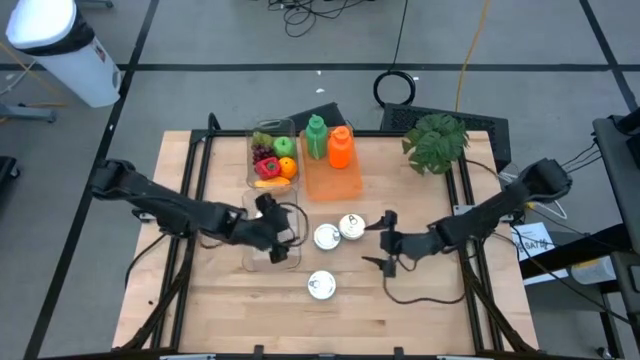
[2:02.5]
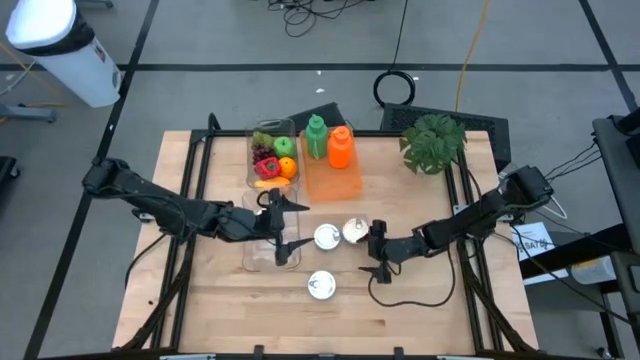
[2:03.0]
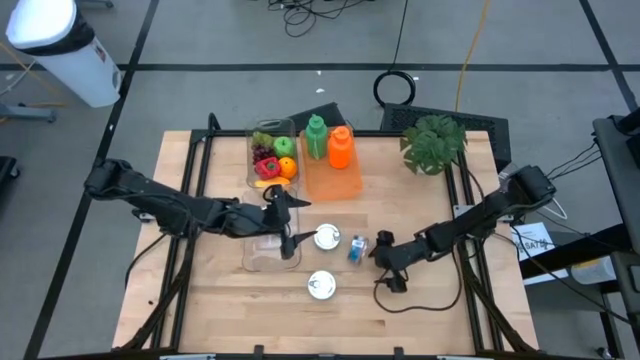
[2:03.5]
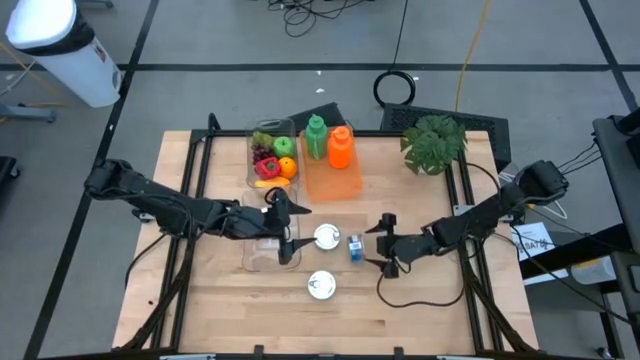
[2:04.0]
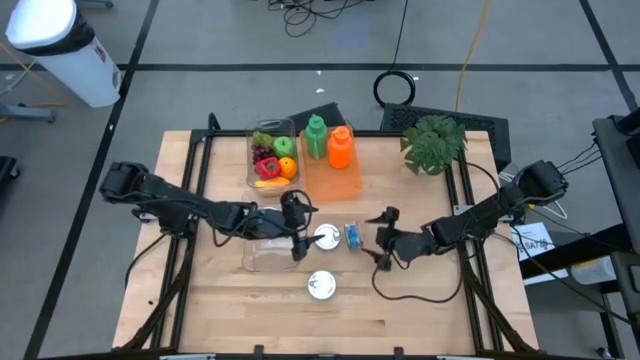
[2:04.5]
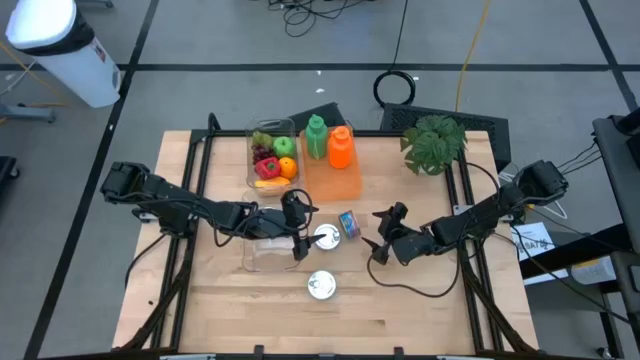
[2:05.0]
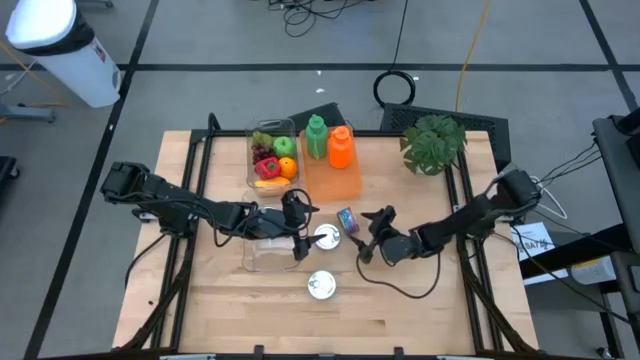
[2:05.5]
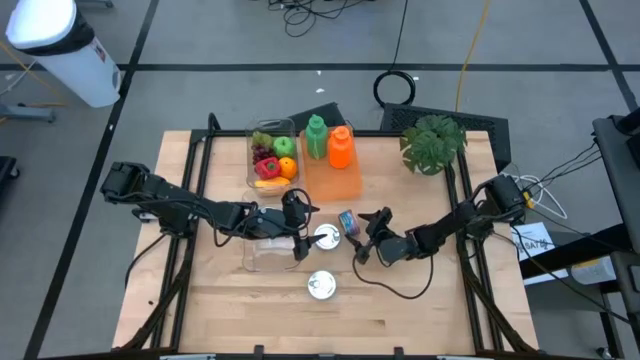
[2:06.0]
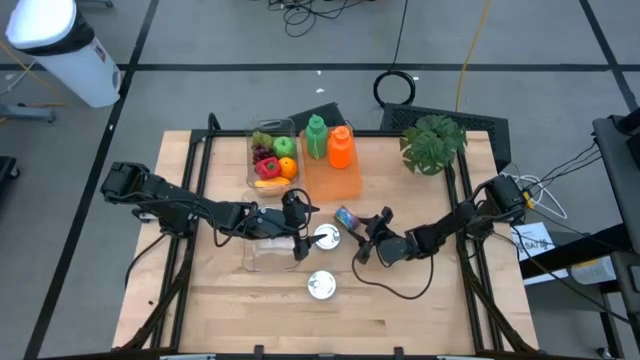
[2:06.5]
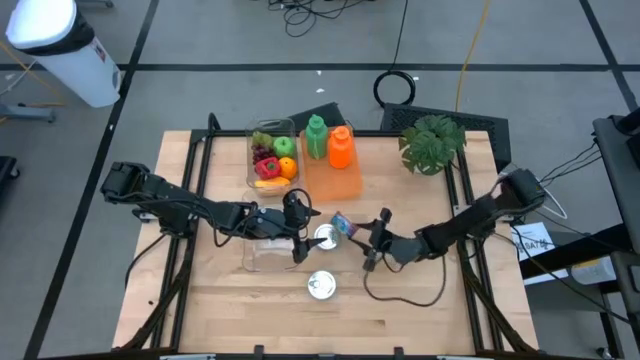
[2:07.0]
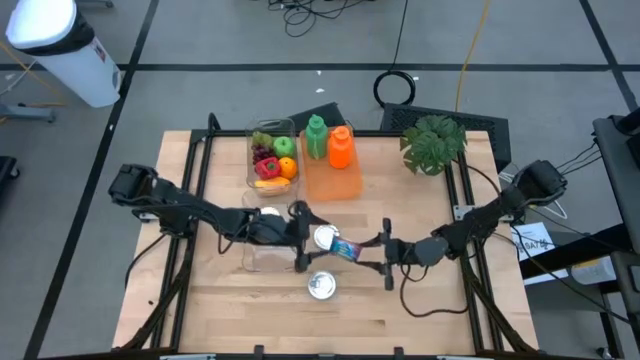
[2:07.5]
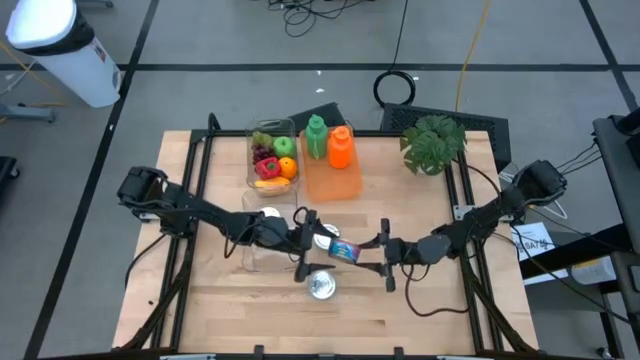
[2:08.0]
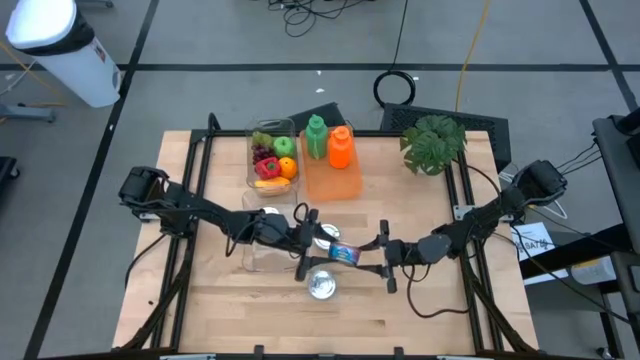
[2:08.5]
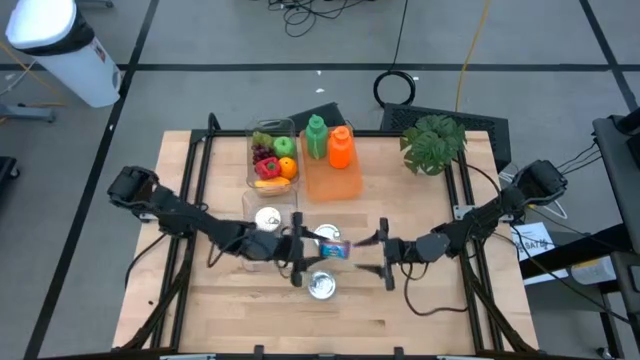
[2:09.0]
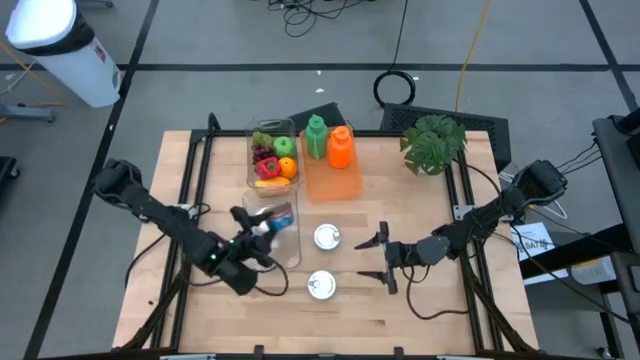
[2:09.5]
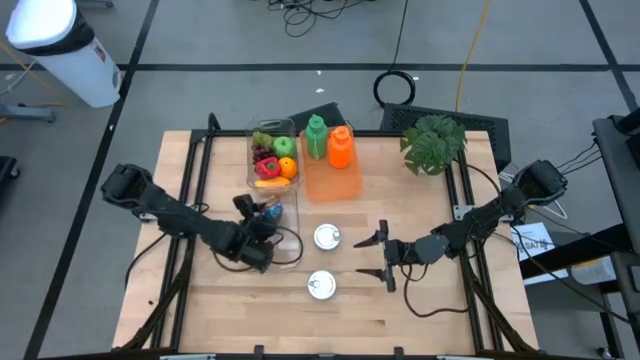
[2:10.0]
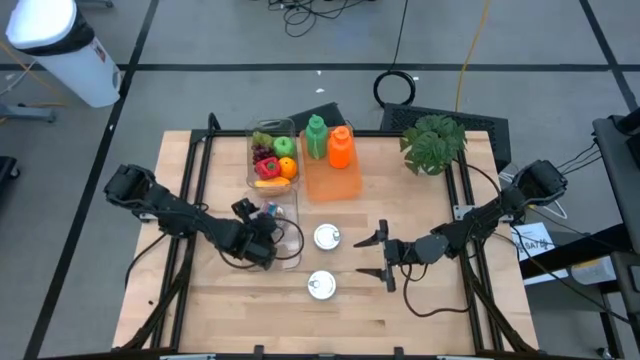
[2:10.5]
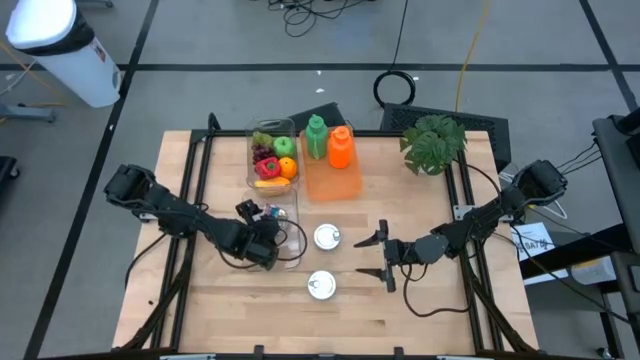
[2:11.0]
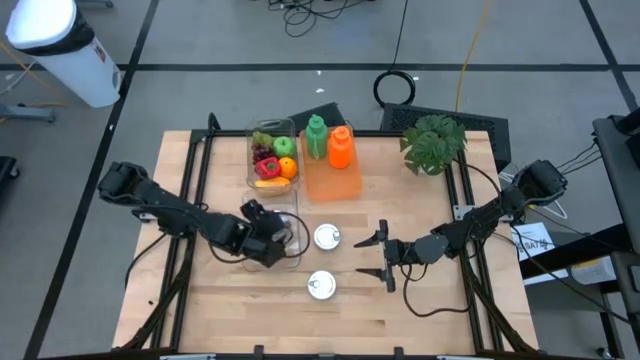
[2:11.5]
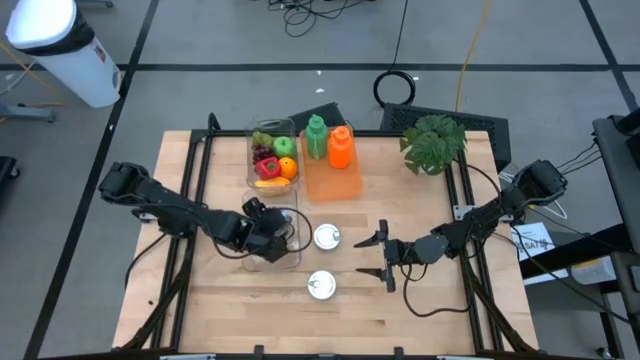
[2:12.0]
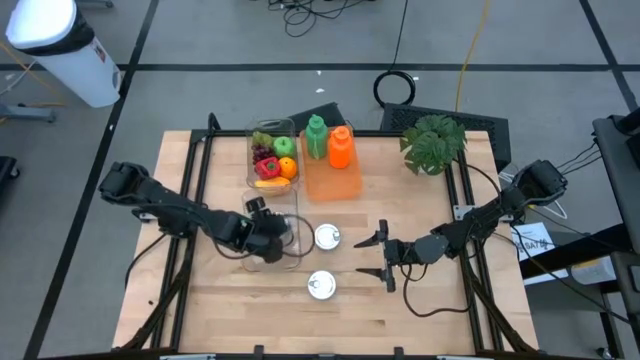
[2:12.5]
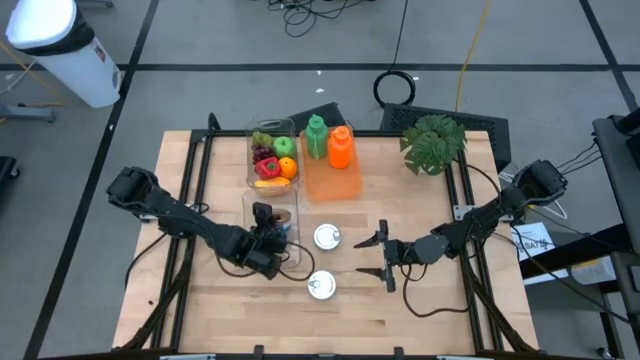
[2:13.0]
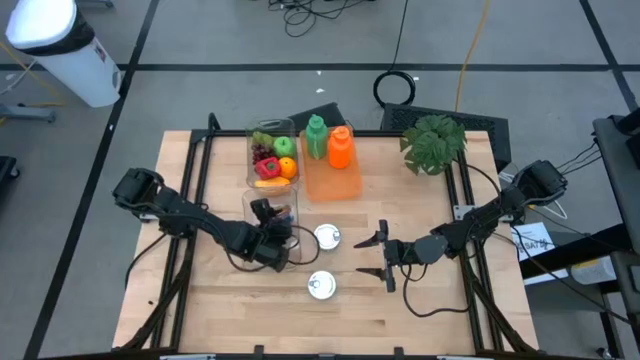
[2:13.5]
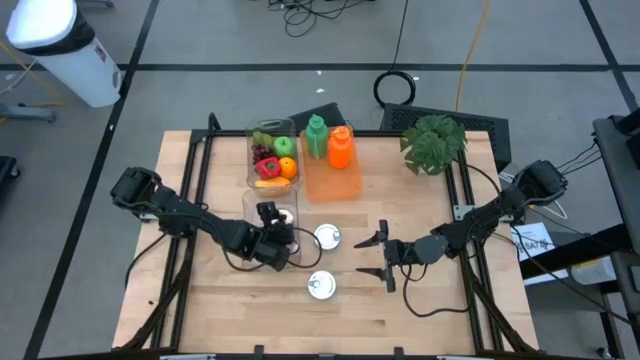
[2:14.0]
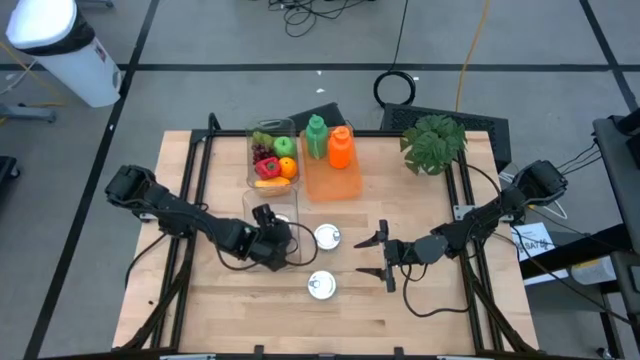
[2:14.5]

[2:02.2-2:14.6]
Task: Pick & Place Food Item
Put the blue pink tuna can into the bottom transparent bin

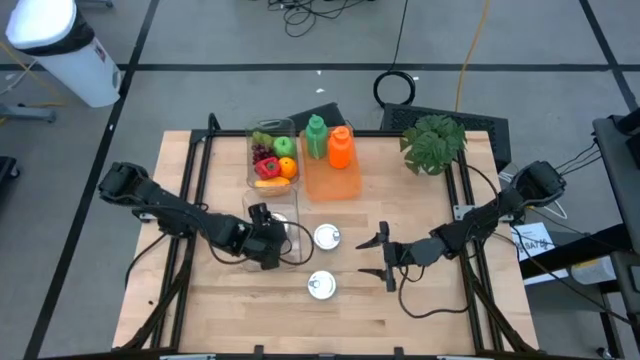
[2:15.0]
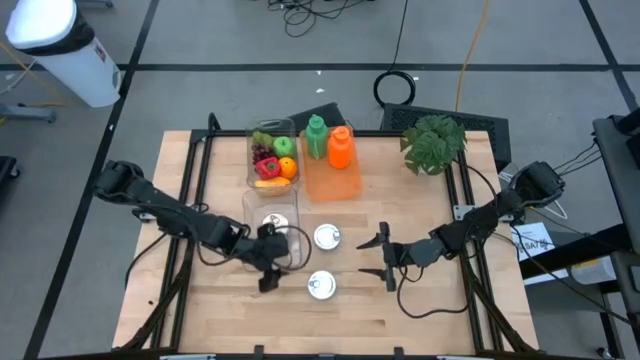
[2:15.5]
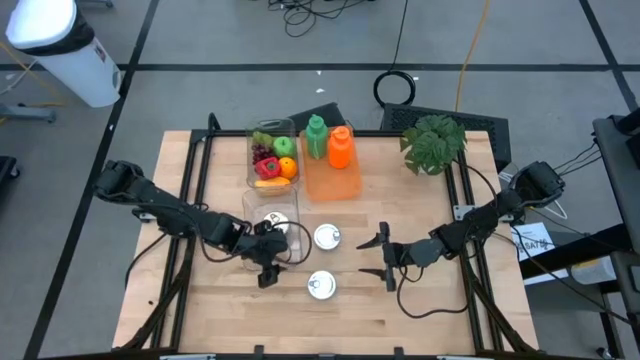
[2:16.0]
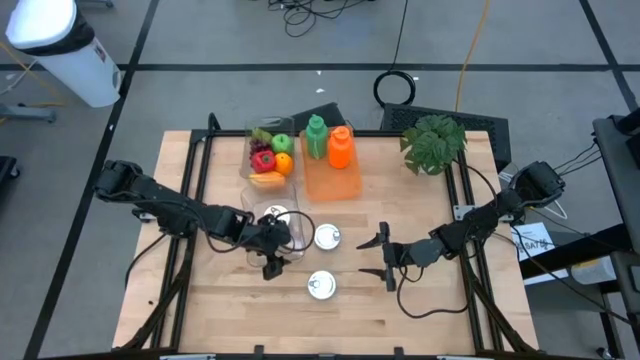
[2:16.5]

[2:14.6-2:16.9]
Adjust the bottom transparent bin

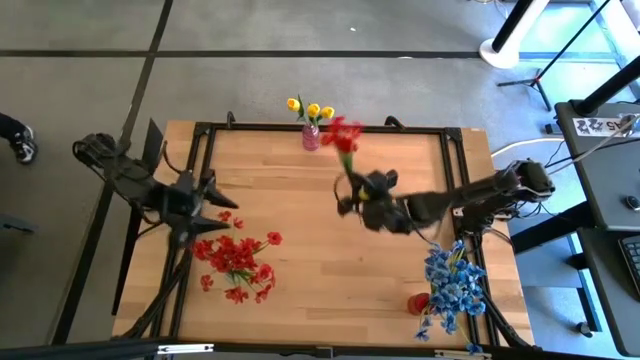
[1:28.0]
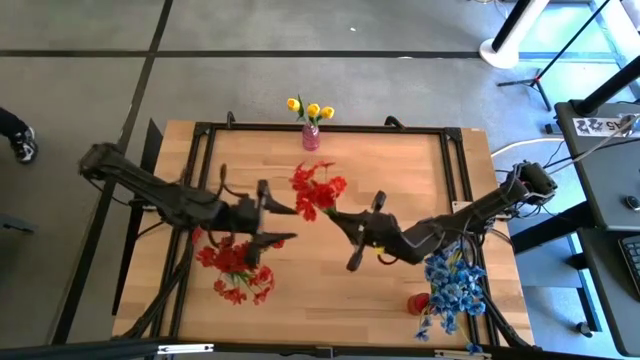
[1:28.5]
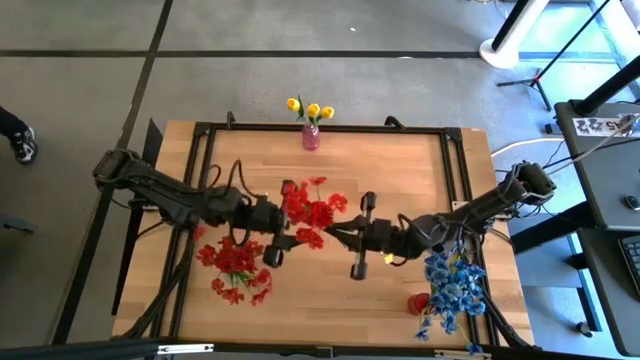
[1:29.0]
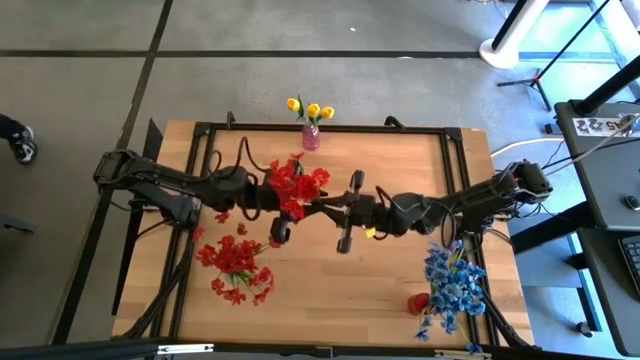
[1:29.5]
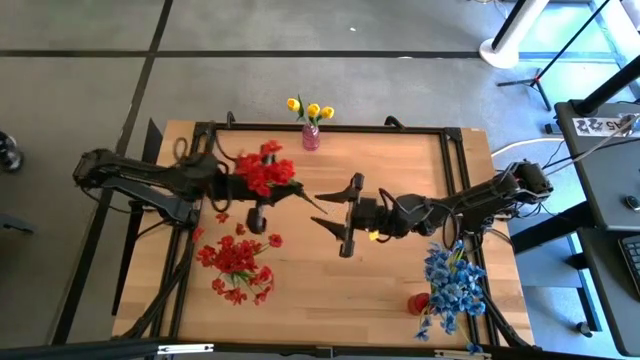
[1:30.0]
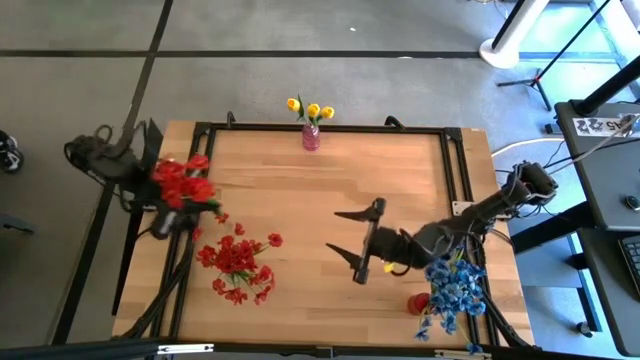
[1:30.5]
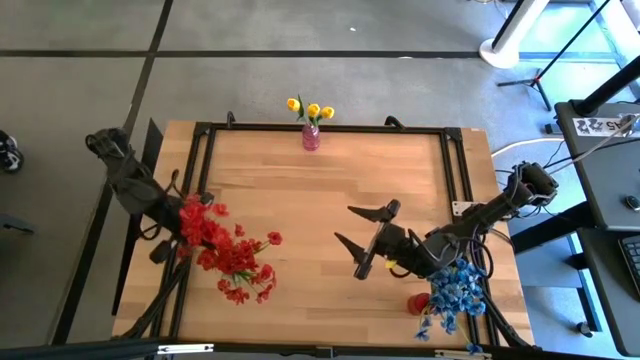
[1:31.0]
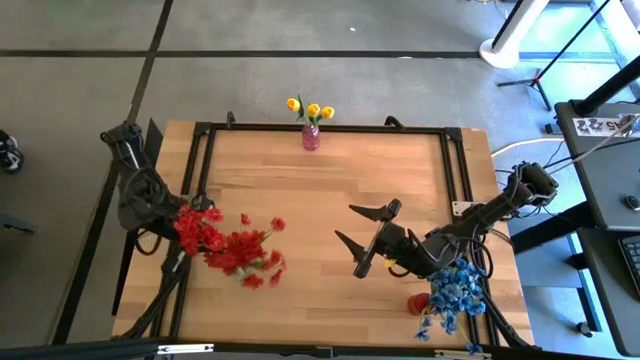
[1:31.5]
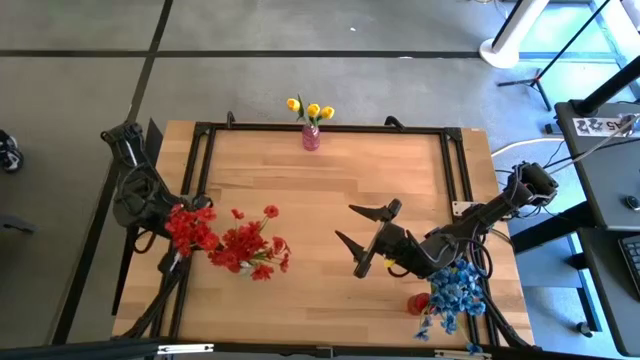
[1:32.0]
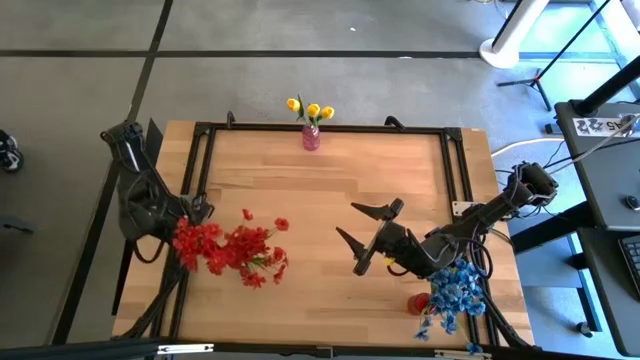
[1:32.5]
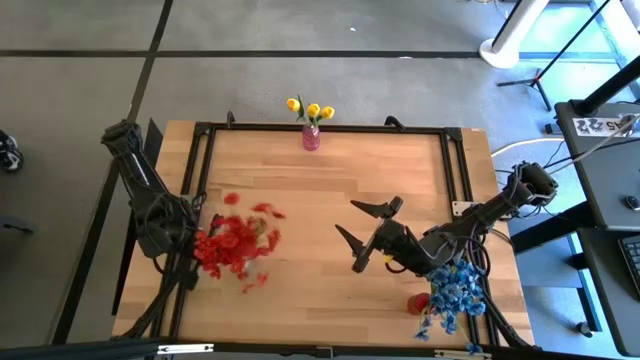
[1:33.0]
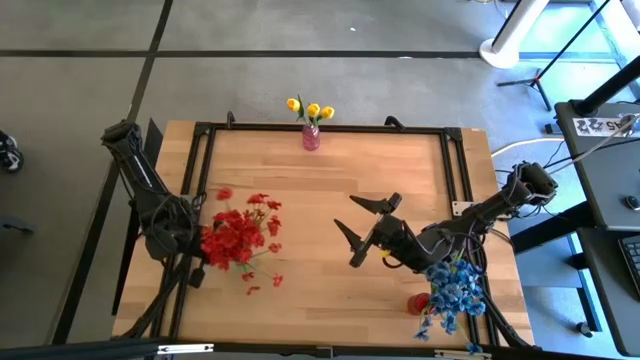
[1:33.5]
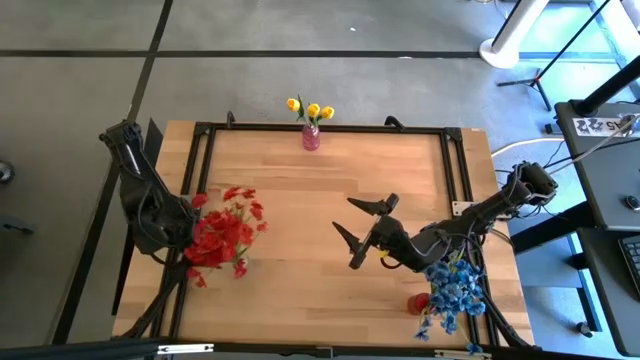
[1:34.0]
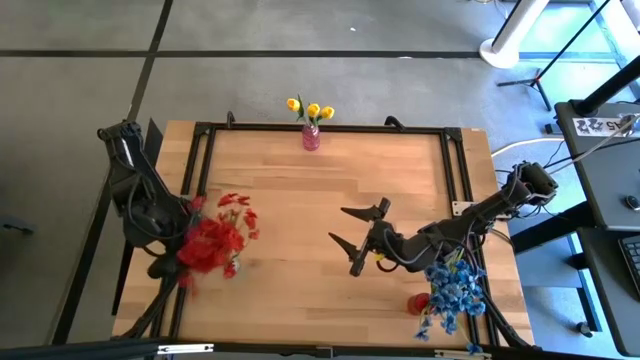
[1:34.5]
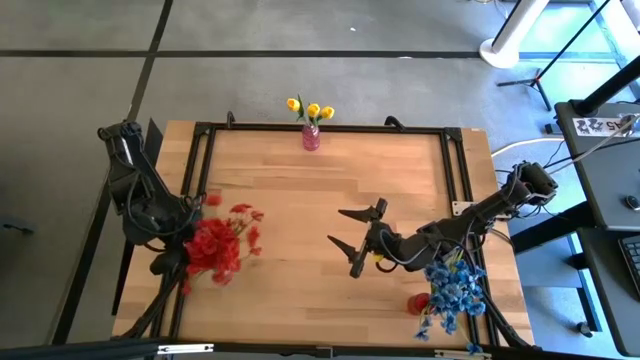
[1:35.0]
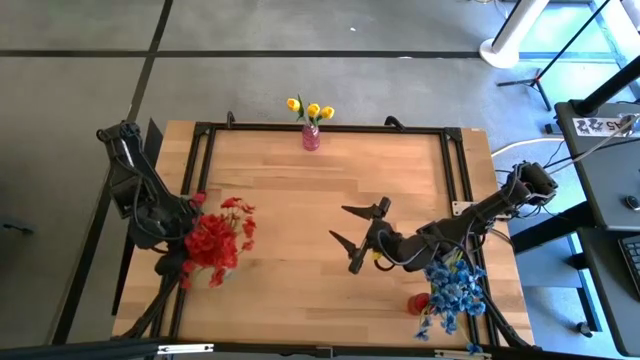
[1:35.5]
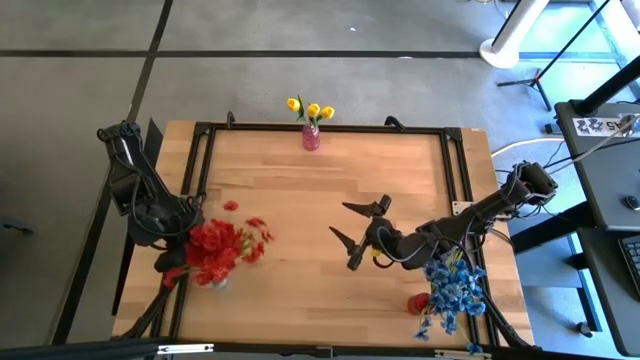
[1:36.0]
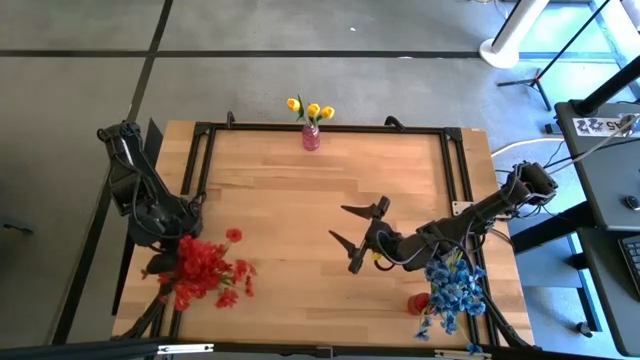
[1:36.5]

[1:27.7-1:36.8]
Task: Sort flowers into vase by color
Put the red flowers into the transparent vase
